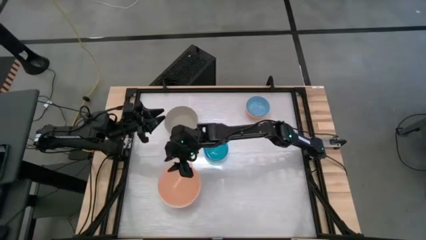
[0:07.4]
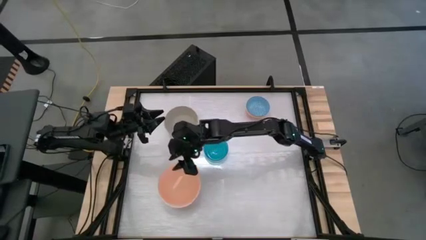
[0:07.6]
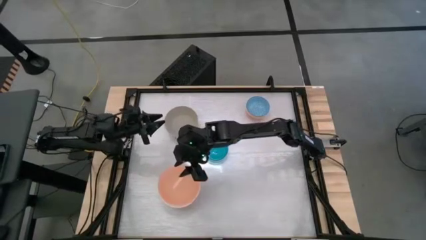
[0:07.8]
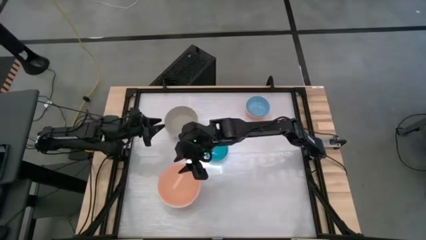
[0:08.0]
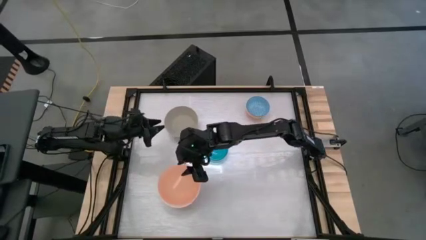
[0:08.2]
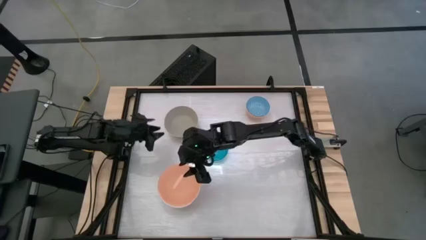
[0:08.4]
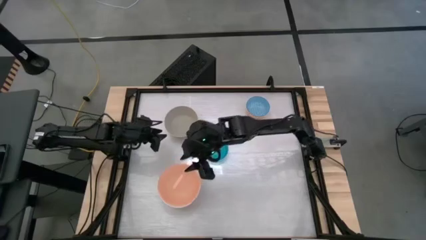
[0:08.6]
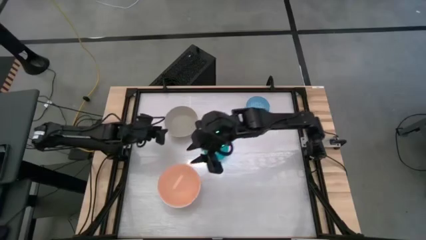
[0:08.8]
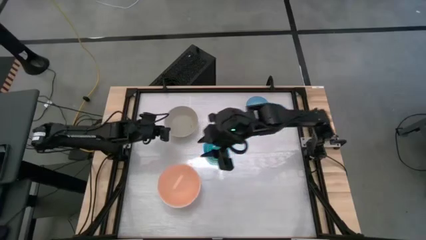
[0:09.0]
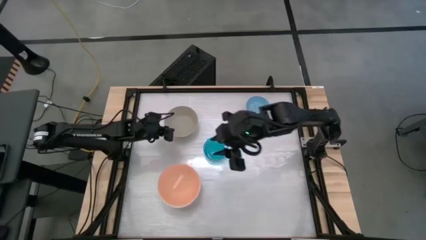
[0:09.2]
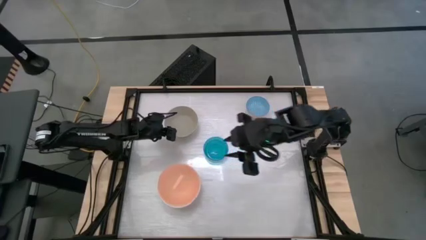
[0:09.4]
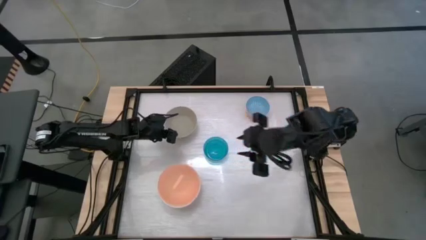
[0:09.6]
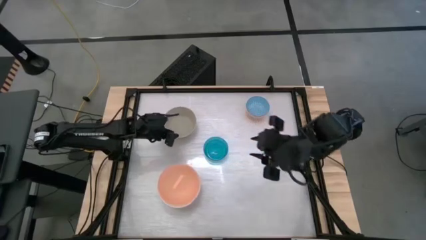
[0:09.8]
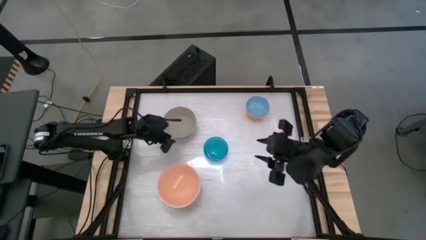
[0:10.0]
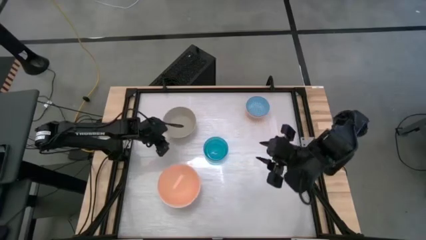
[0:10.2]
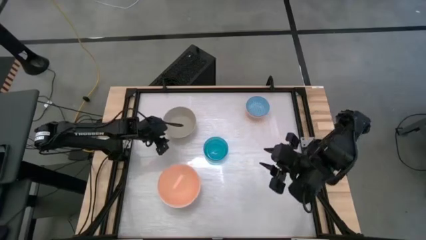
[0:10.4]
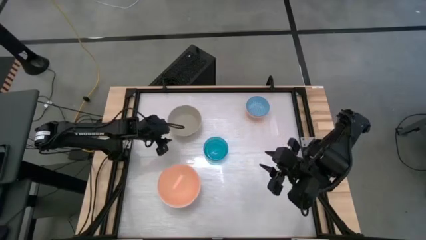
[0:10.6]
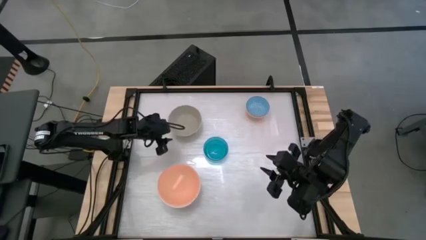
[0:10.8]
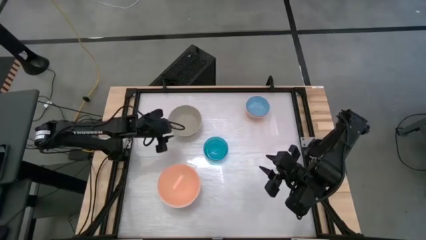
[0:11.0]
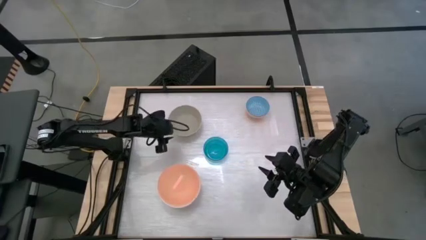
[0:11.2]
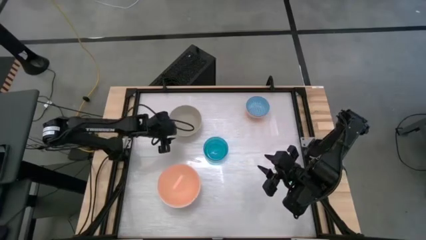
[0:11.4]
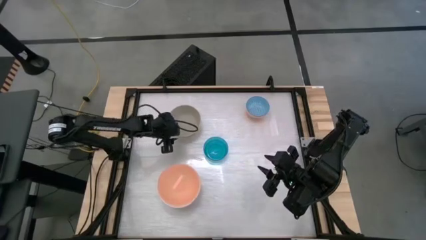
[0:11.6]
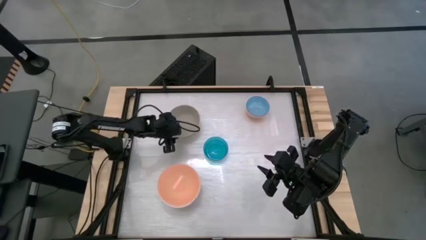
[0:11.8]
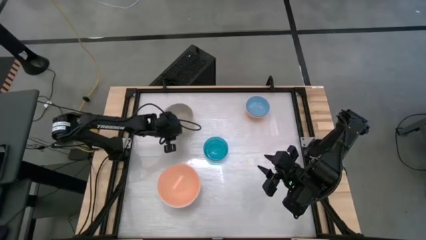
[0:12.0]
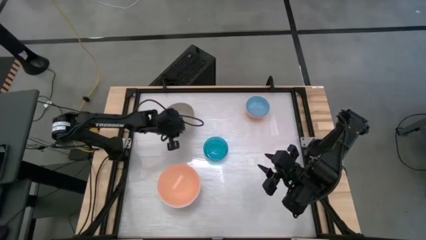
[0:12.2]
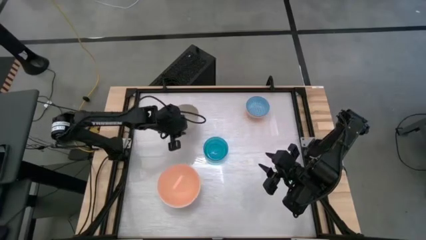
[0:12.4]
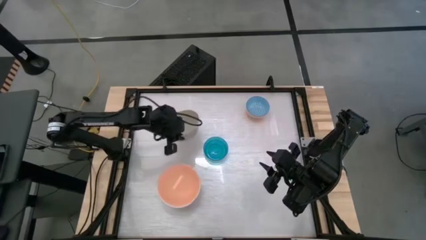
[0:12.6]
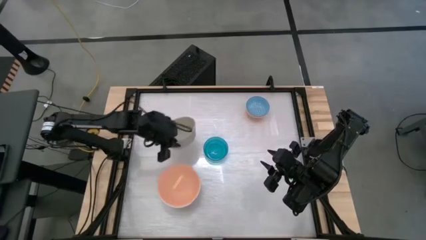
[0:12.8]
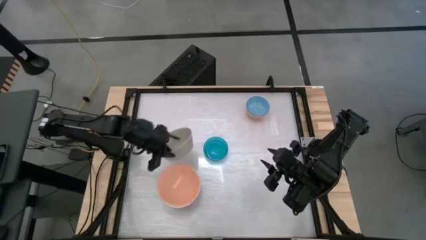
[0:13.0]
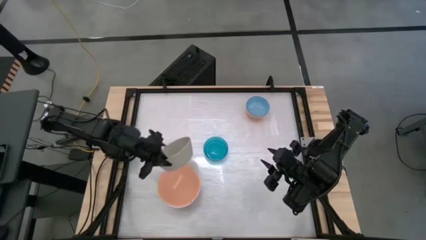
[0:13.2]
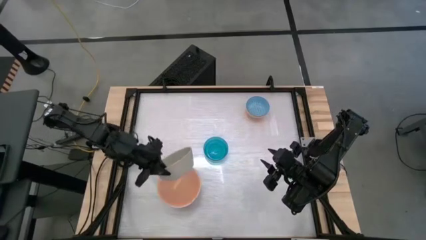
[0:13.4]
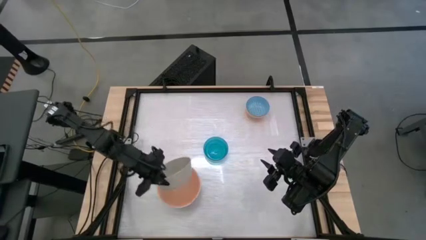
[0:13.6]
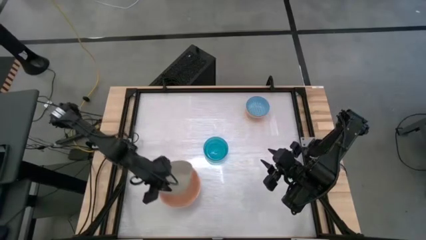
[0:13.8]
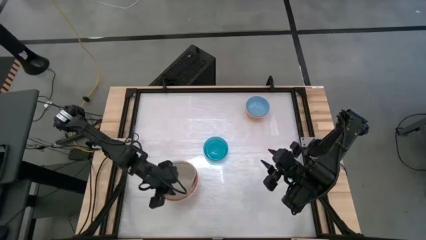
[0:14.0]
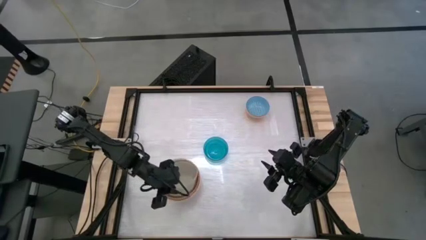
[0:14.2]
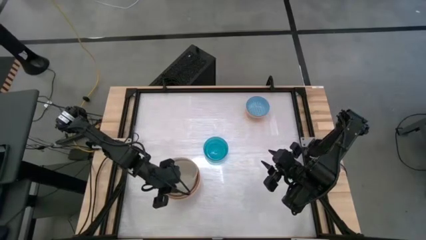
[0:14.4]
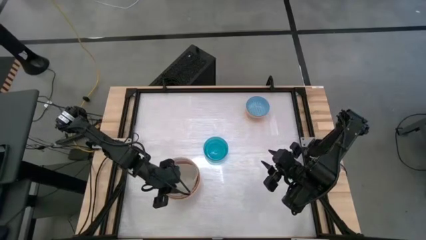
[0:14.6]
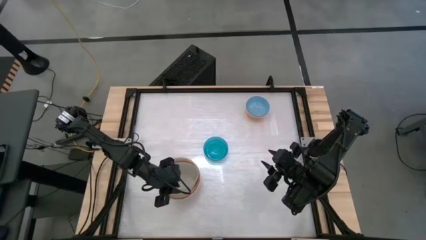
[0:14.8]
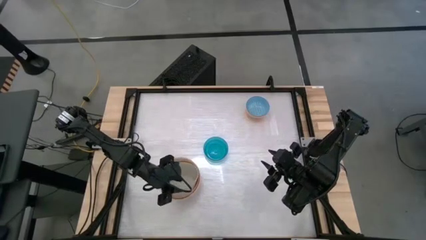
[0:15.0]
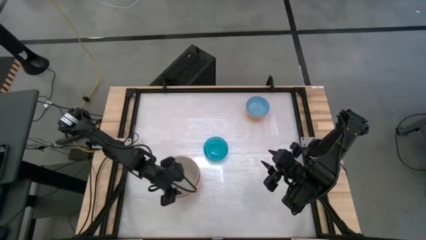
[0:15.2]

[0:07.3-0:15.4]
Stack the gray bowl on top of the light orange bowl

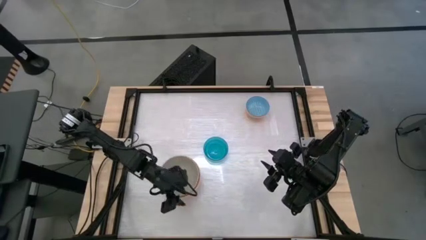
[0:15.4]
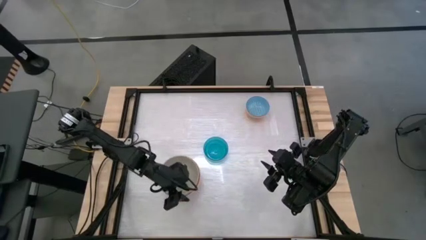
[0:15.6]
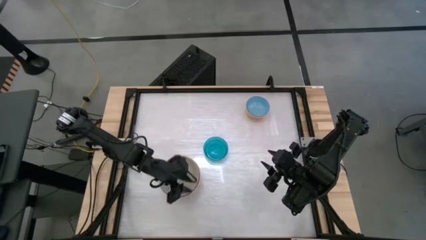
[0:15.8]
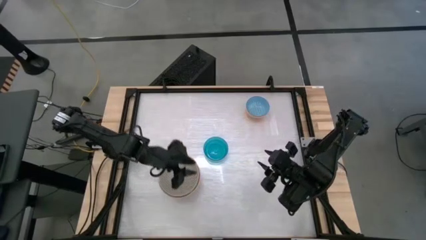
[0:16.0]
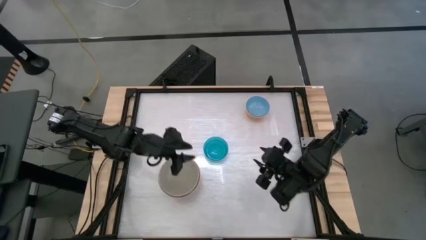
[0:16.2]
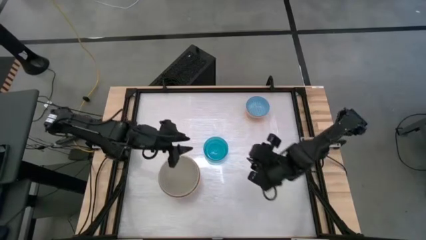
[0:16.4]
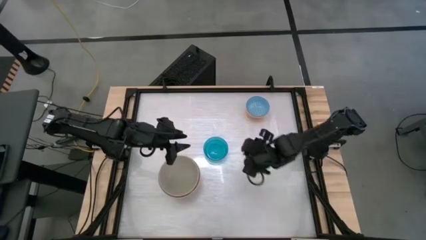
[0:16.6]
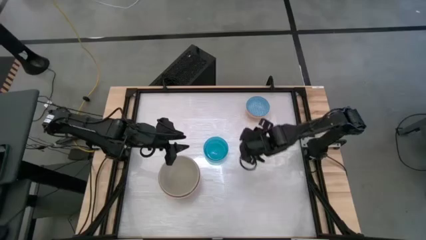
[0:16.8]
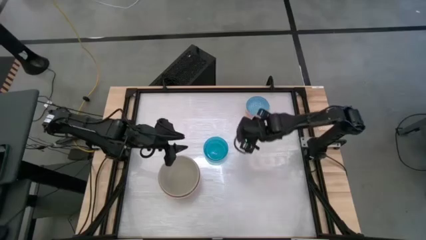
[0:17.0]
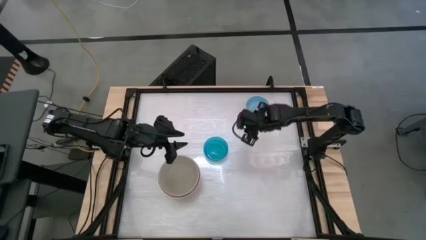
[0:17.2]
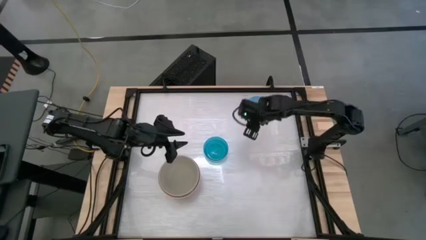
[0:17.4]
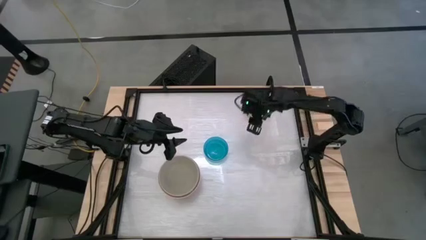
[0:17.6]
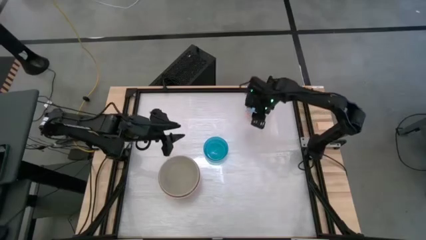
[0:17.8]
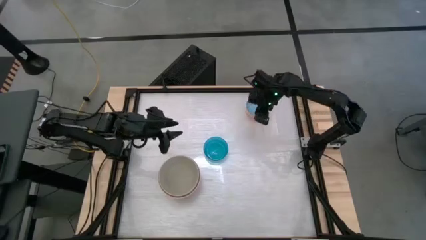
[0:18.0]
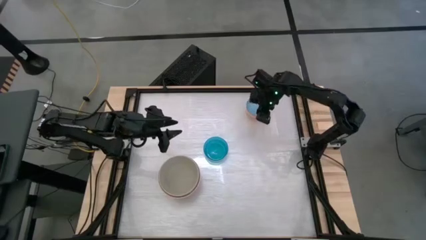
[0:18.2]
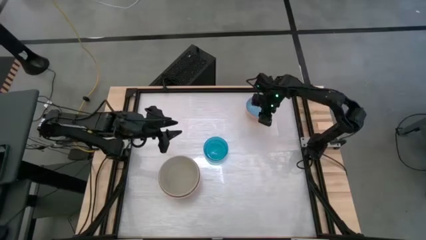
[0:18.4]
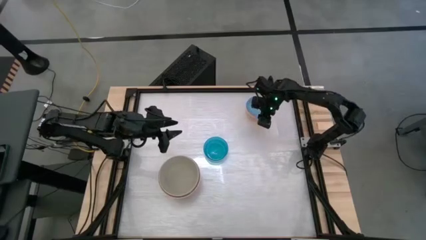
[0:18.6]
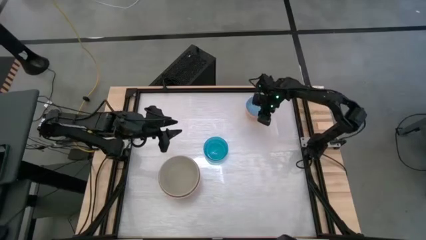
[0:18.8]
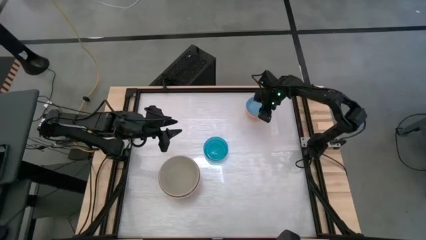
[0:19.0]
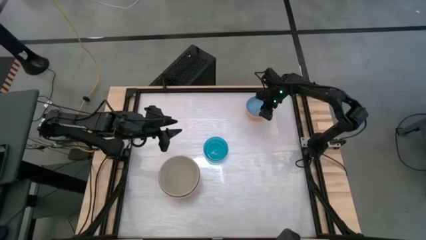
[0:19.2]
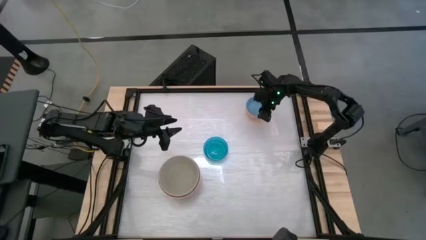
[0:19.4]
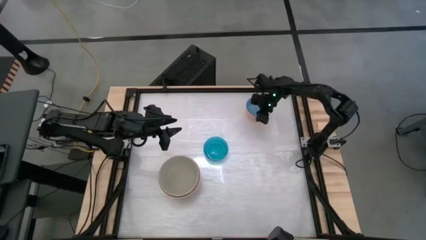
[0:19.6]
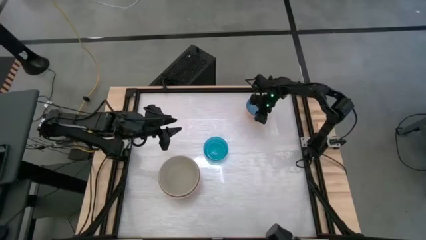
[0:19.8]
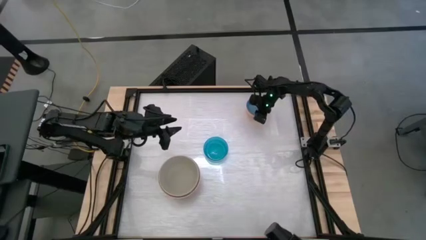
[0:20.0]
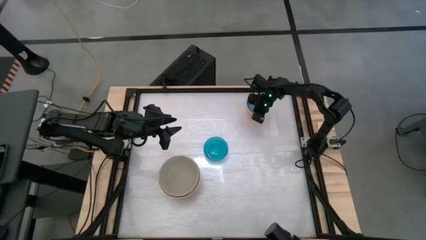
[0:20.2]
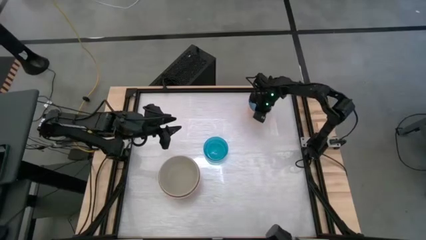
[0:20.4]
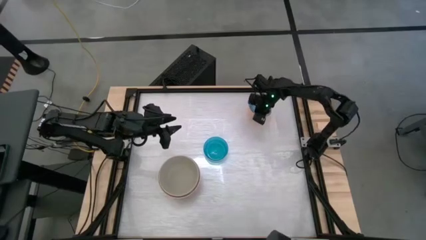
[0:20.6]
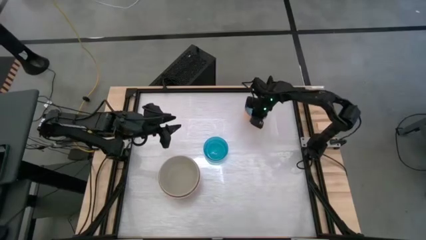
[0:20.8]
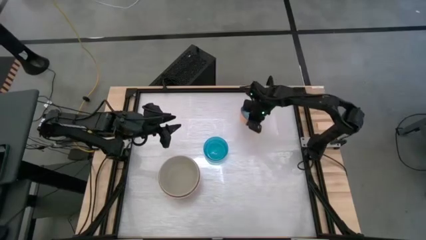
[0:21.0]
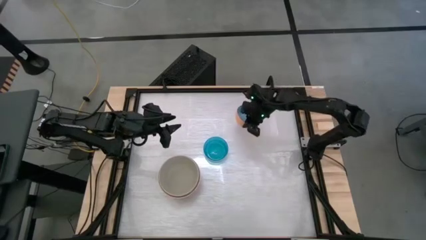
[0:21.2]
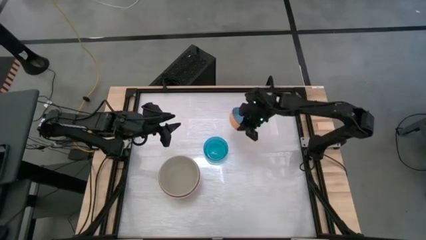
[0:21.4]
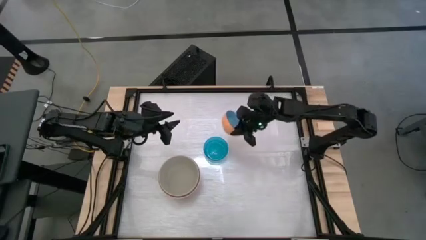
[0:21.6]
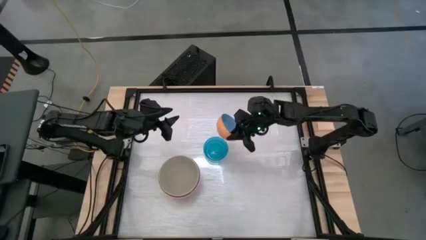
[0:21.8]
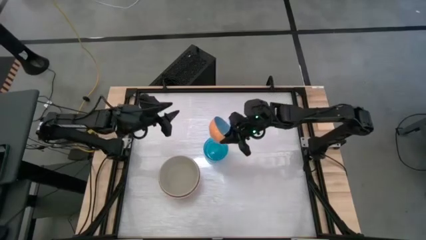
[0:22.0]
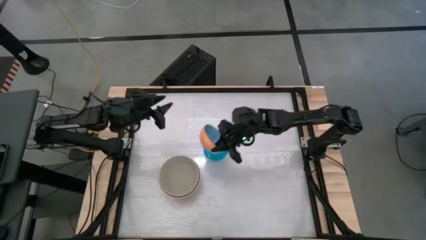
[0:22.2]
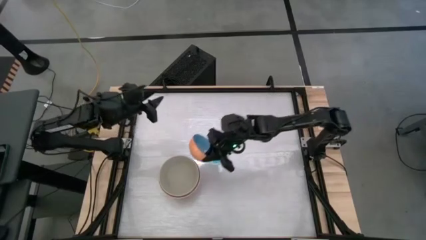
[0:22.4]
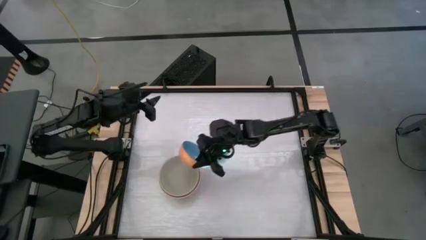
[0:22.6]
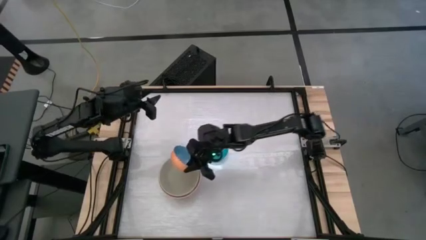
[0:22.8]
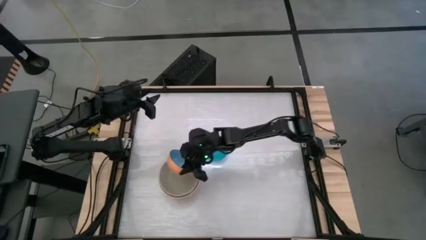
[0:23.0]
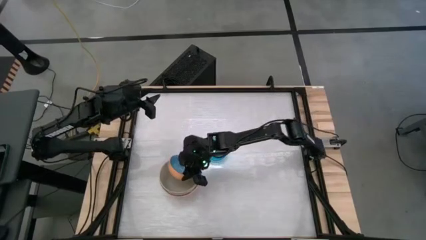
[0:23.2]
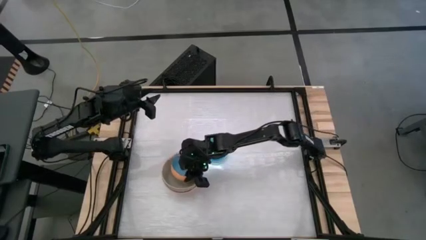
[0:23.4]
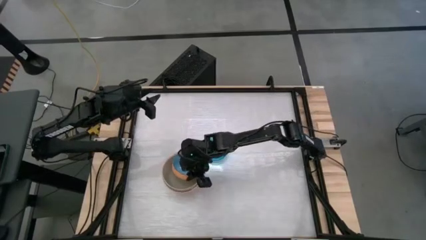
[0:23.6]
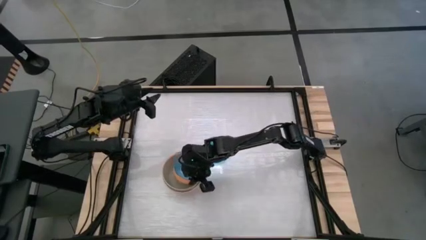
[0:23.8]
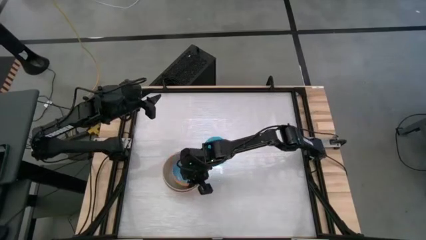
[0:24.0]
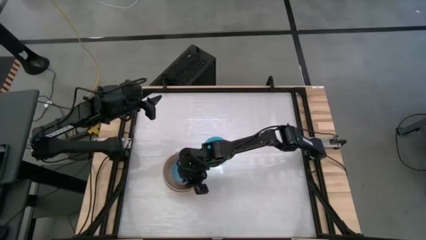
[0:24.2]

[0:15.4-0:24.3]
Stack the patterned blue bowl on top of the white bowl
